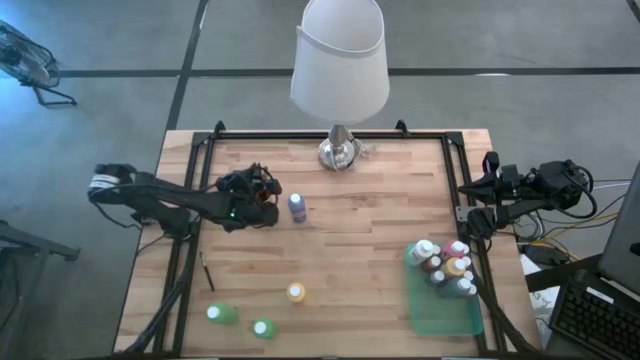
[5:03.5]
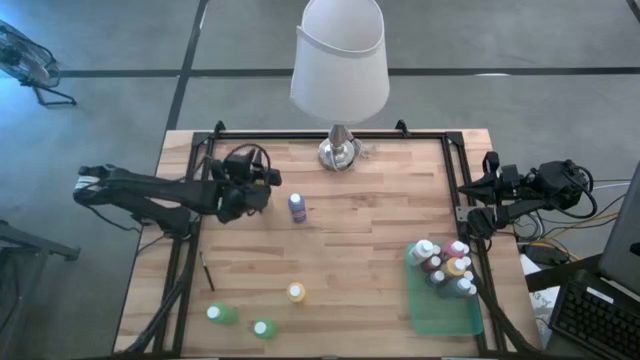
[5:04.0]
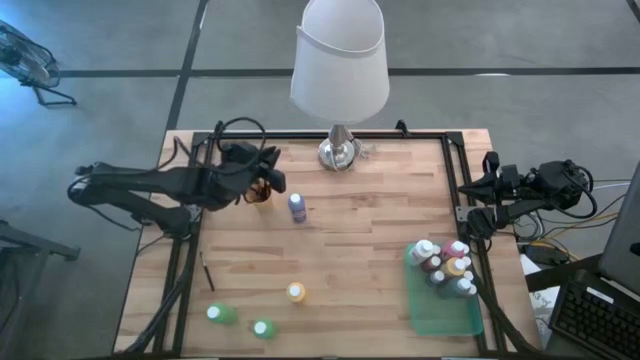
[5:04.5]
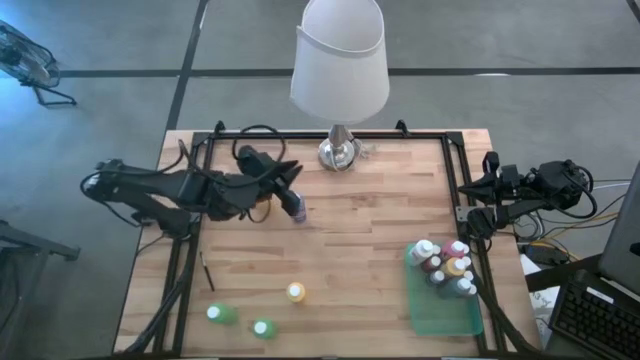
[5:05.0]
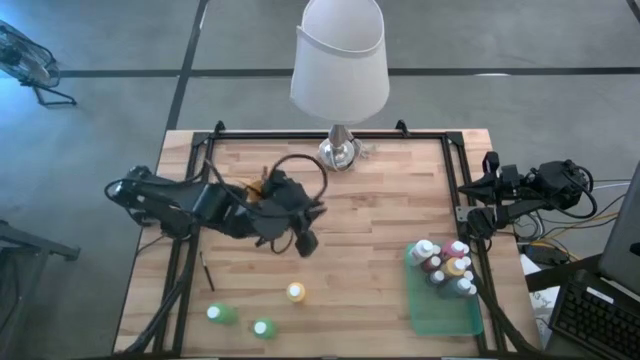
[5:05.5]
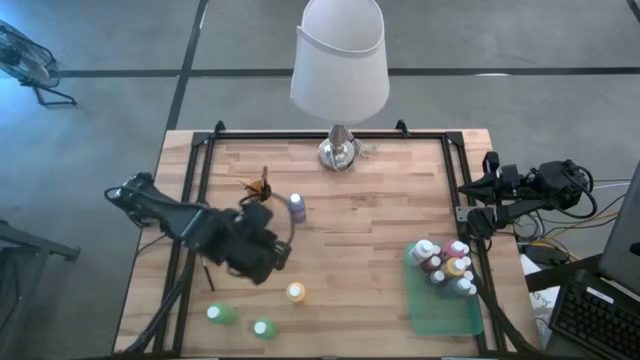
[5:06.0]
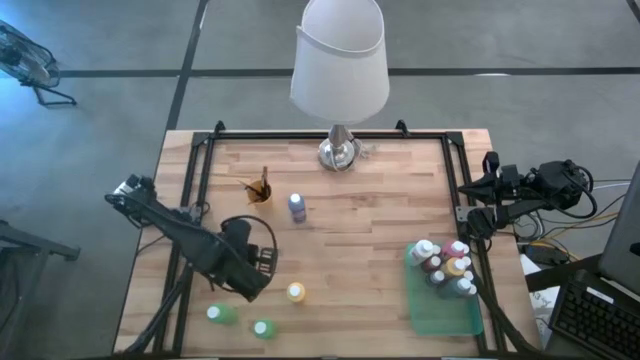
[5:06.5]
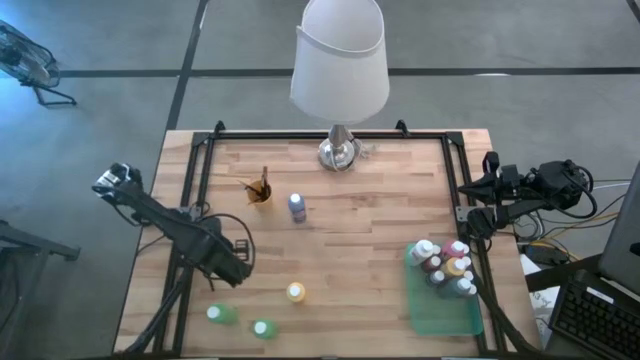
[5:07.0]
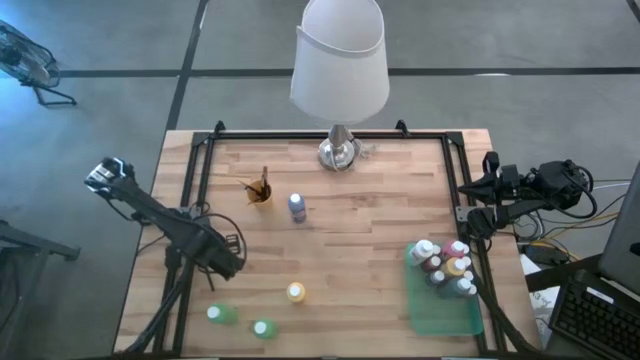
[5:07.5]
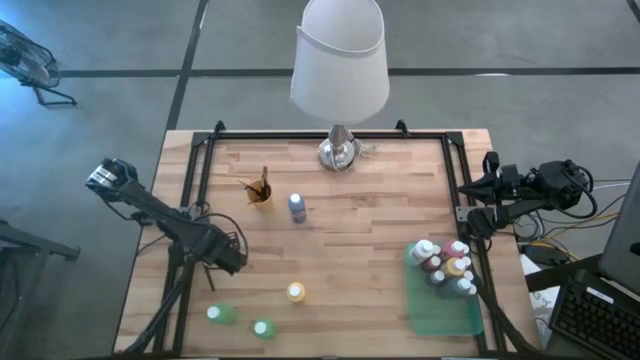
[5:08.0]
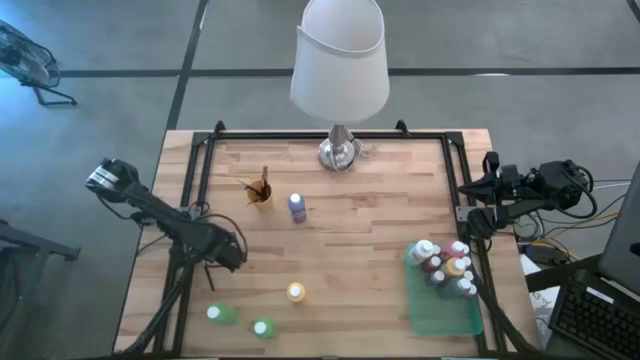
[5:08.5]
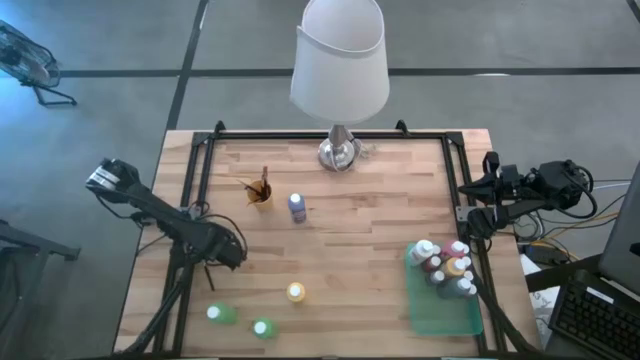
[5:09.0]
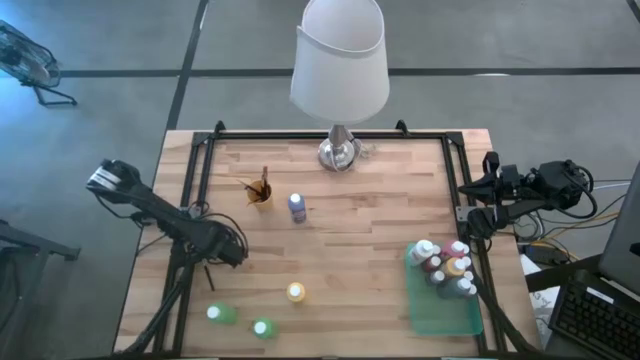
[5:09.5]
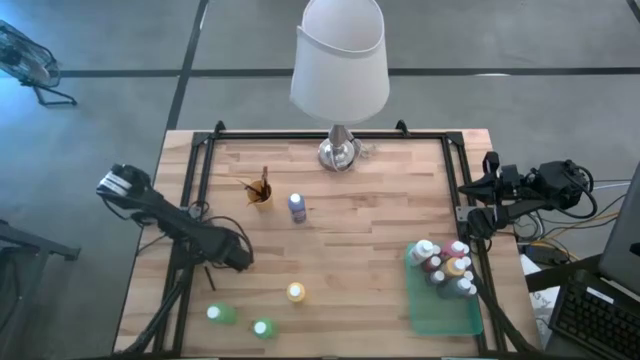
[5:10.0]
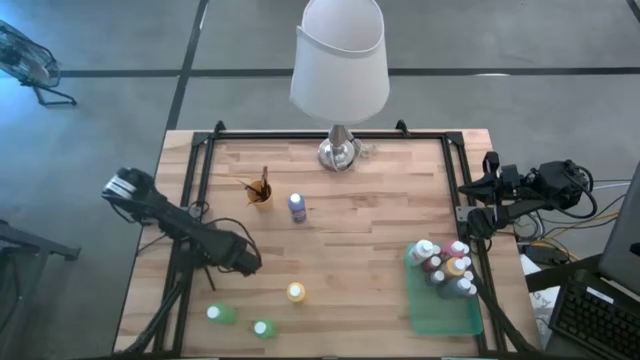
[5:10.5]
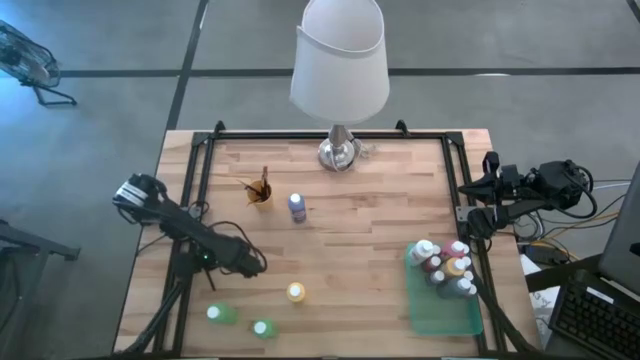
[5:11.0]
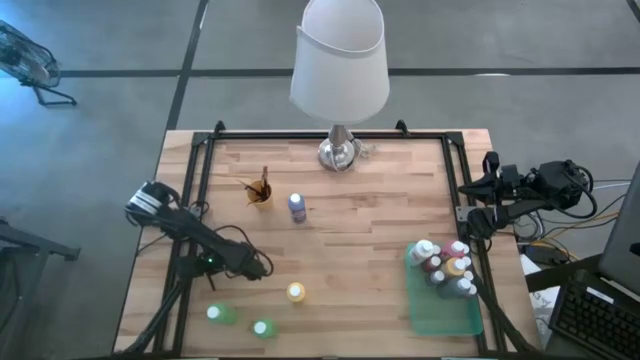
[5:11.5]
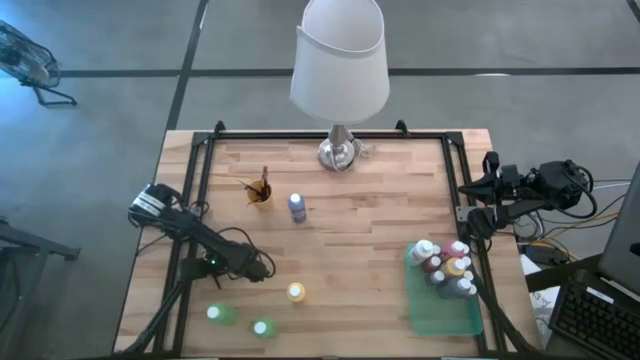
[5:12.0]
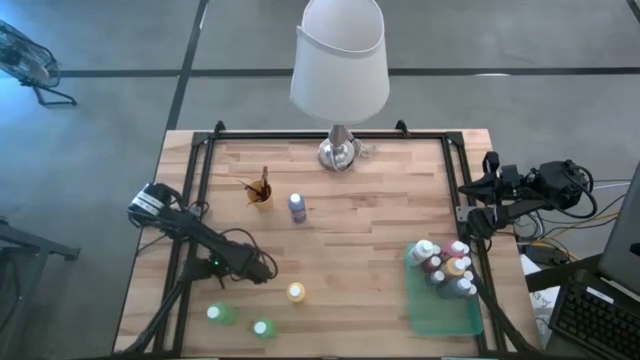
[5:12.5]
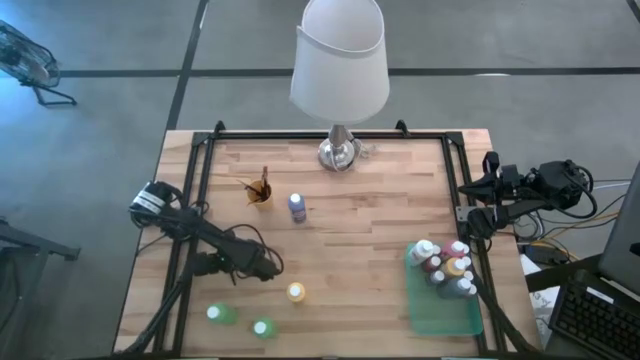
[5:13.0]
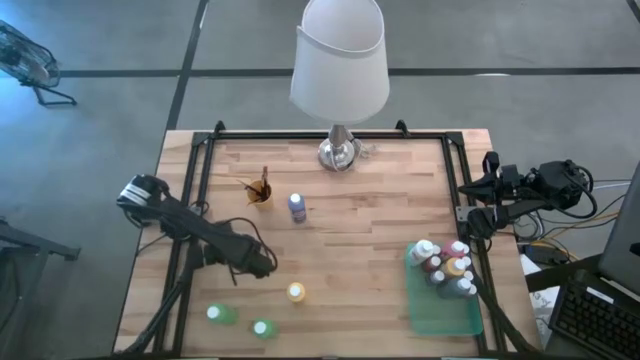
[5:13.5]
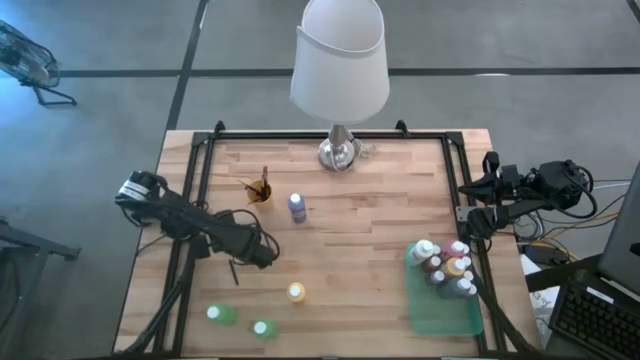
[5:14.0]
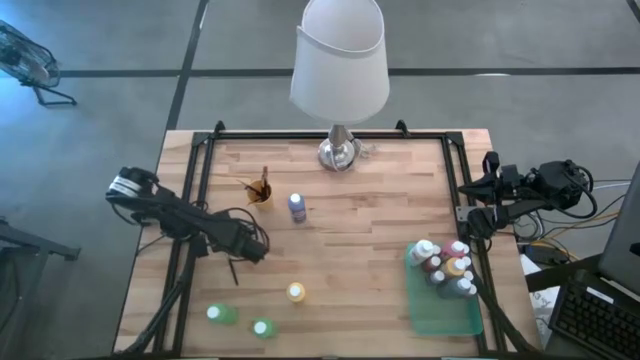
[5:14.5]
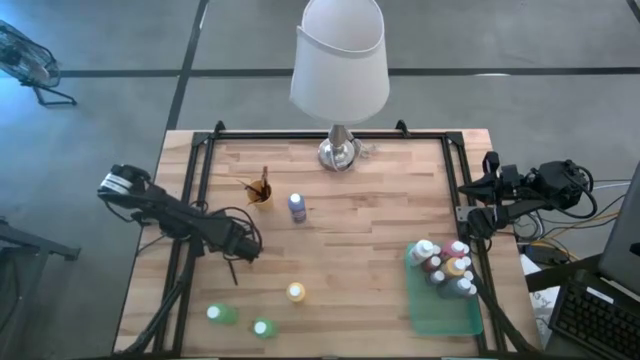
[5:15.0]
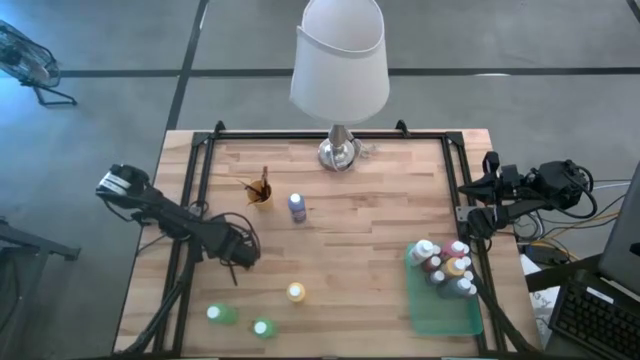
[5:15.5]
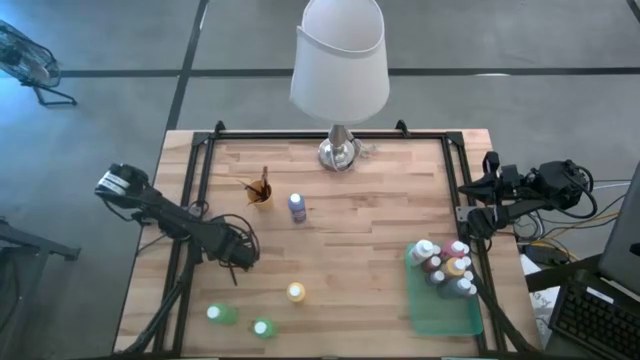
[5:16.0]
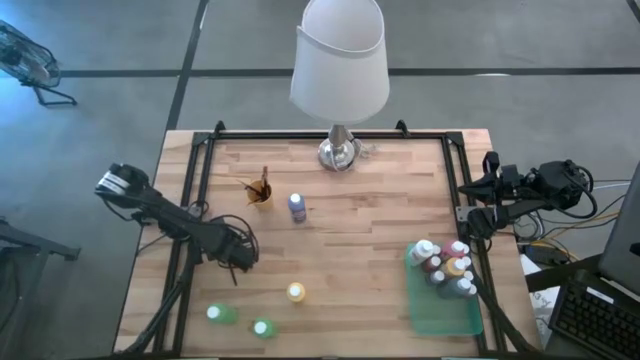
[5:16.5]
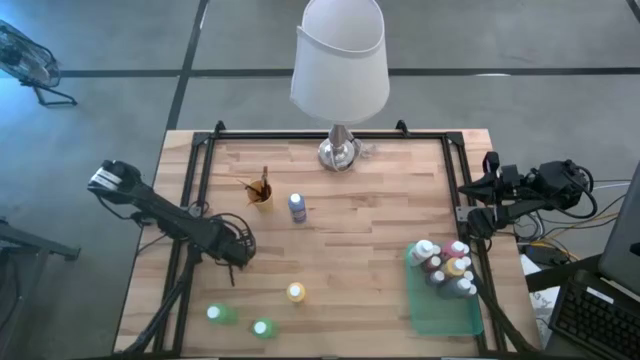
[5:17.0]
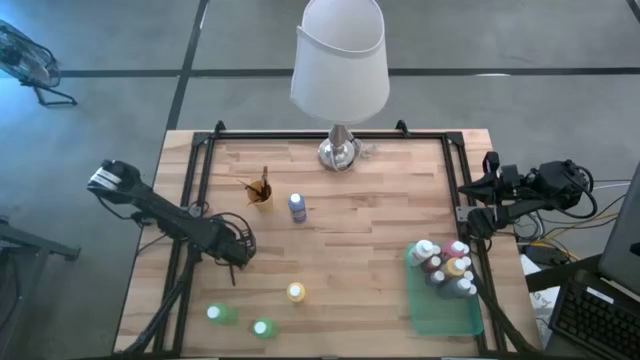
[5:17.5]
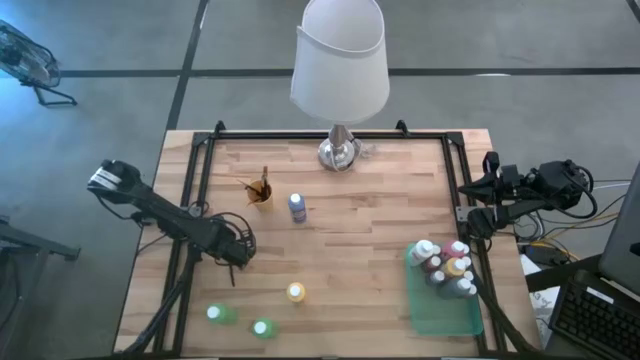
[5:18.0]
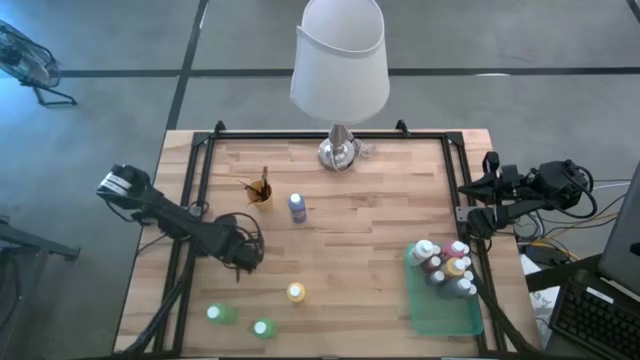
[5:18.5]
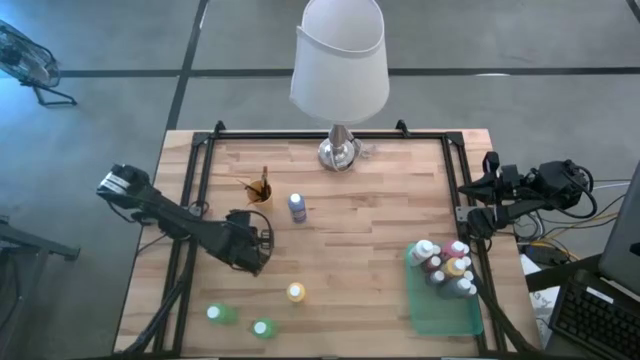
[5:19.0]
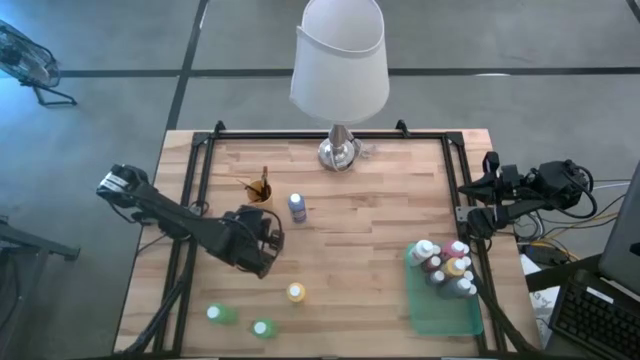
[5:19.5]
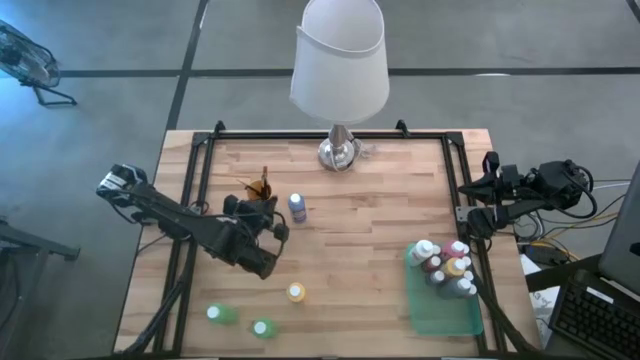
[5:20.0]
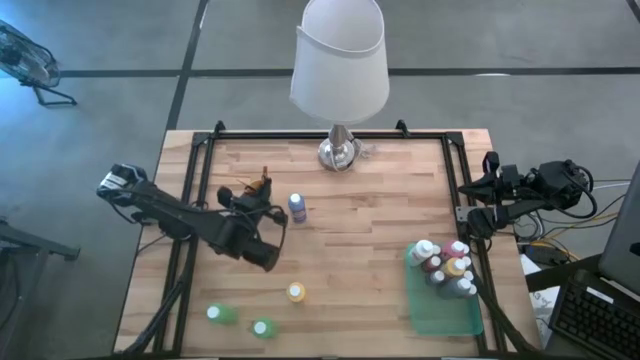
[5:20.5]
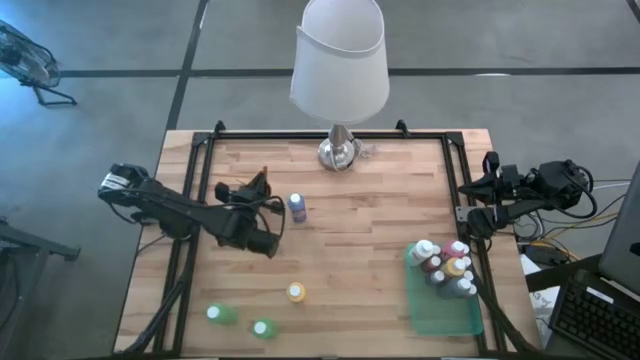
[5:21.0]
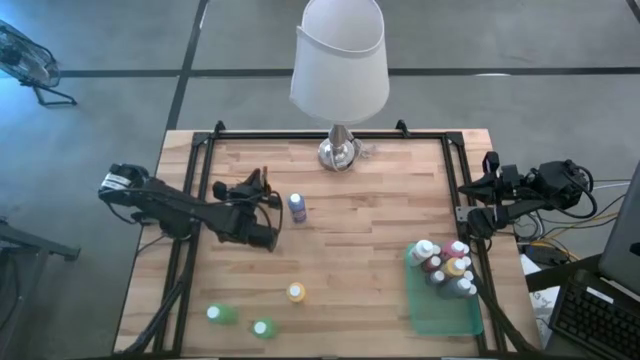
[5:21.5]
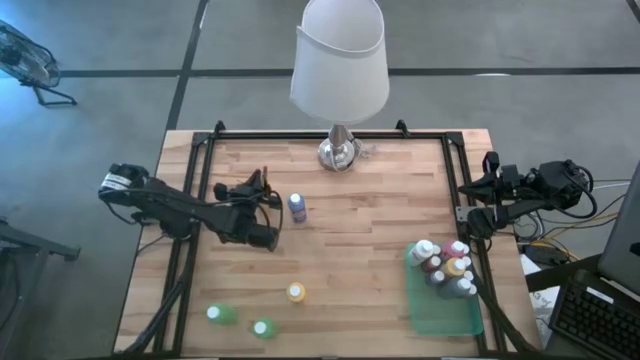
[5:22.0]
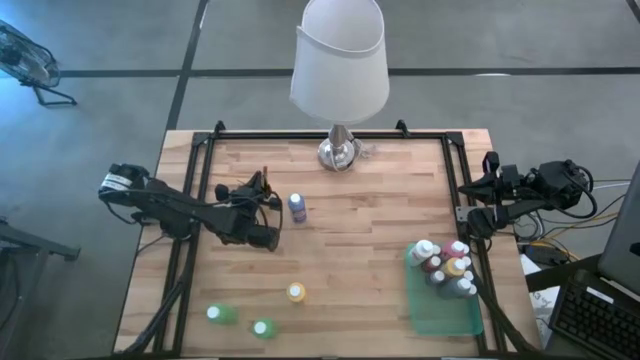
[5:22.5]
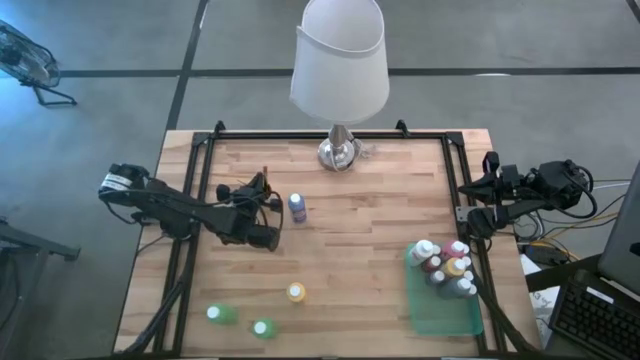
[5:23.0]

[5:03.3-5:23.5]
Task: Pick & Place Paint Supplies
Put the silver paint brush into the yellow cup
